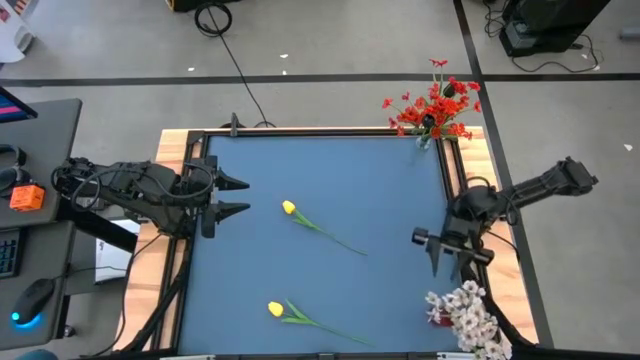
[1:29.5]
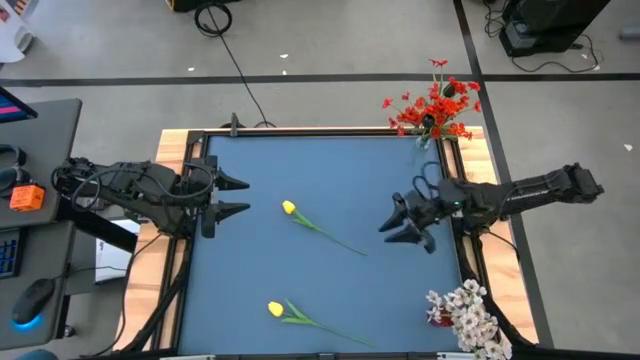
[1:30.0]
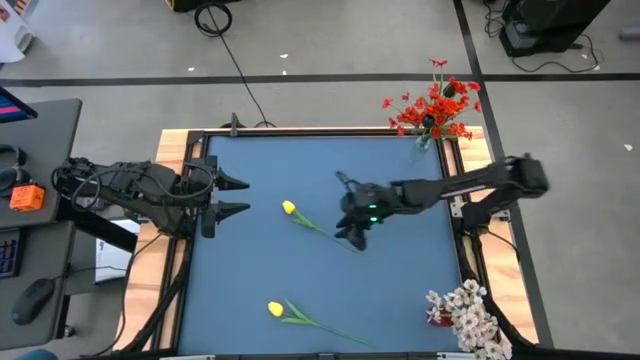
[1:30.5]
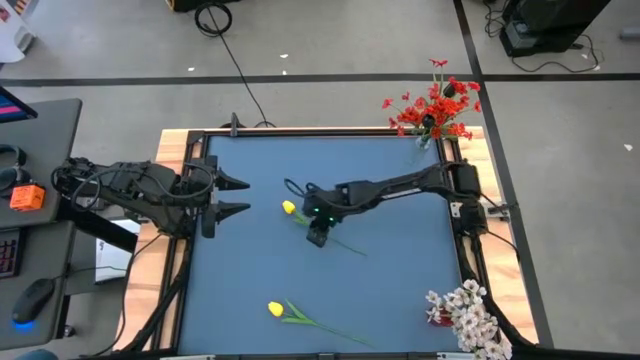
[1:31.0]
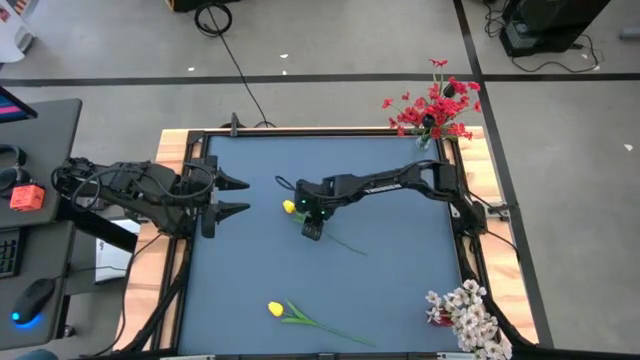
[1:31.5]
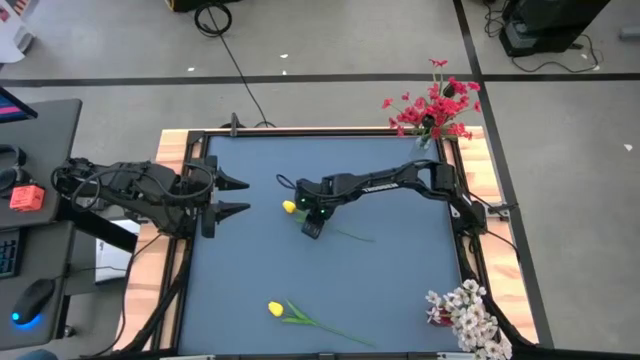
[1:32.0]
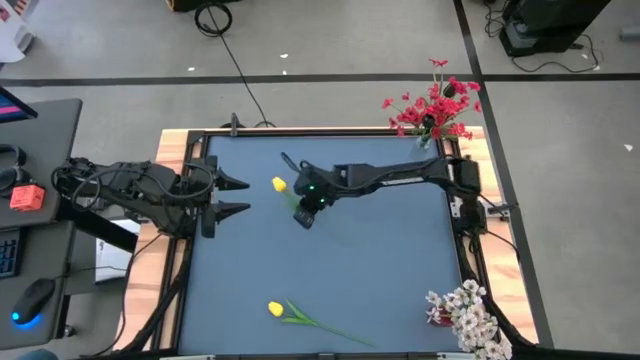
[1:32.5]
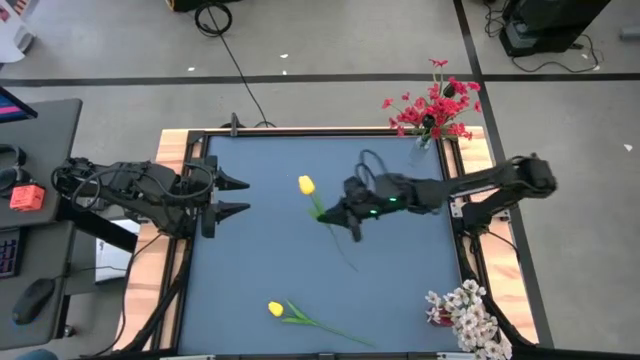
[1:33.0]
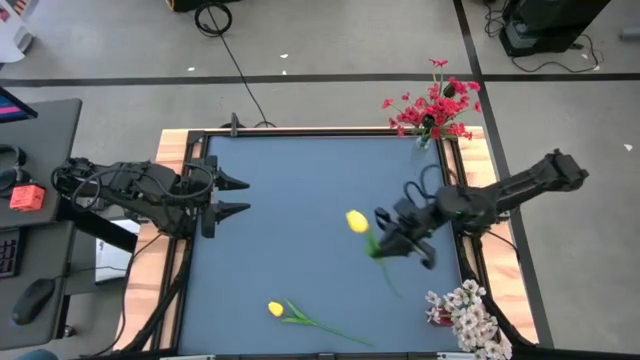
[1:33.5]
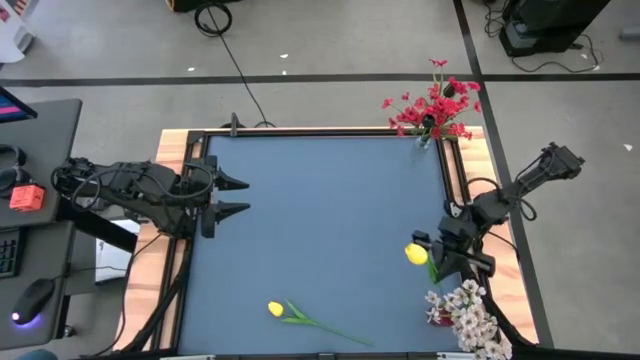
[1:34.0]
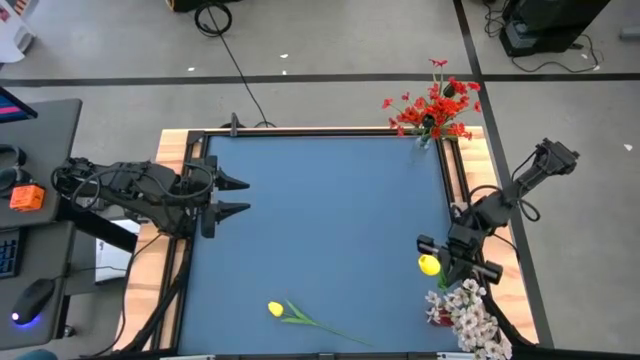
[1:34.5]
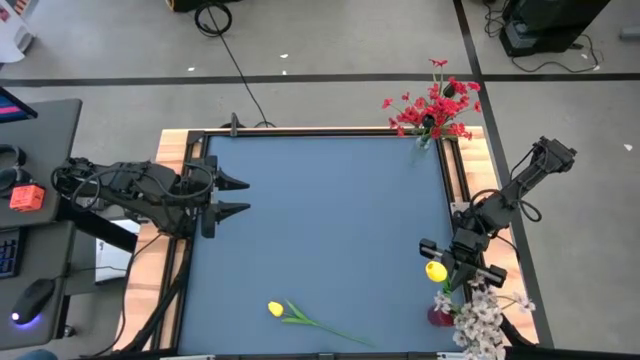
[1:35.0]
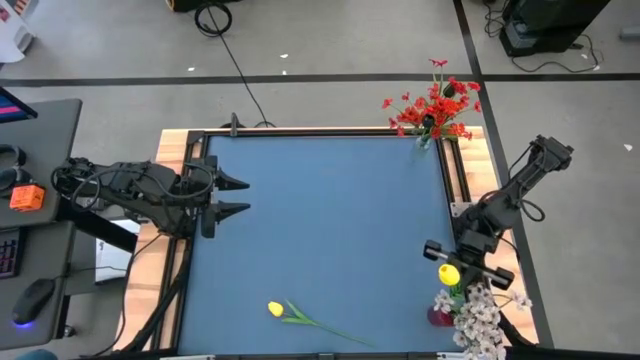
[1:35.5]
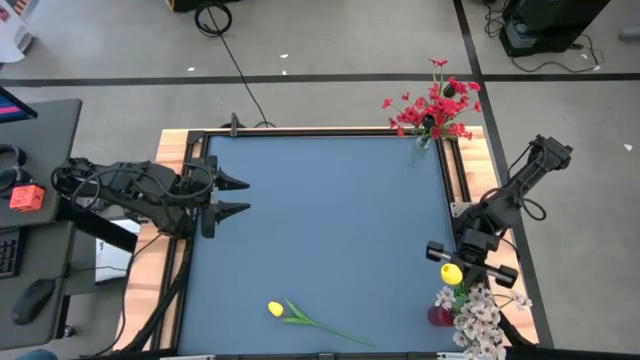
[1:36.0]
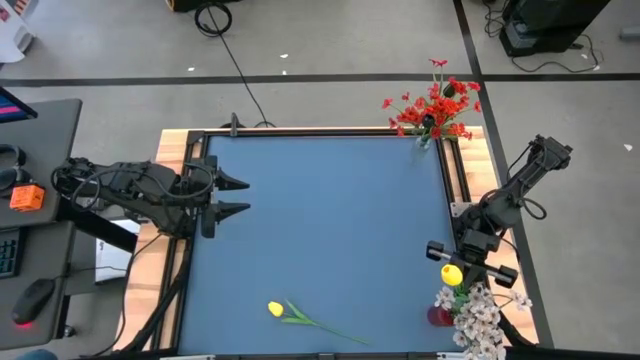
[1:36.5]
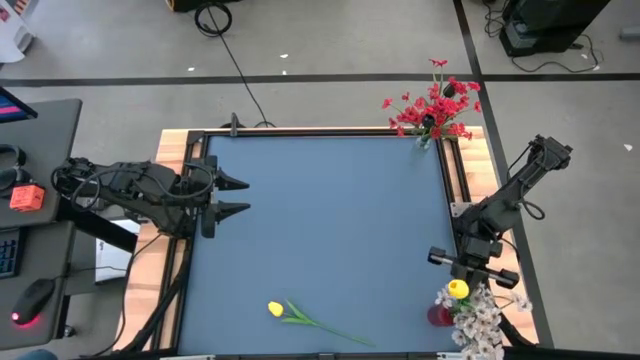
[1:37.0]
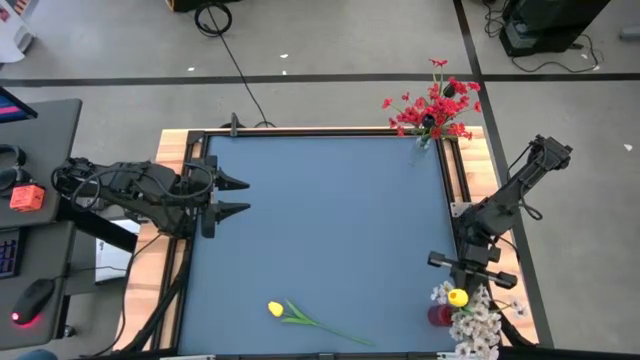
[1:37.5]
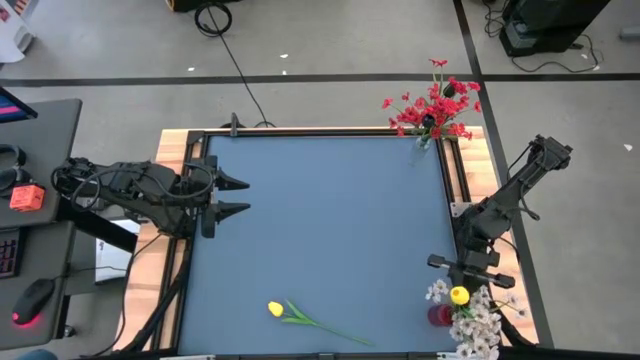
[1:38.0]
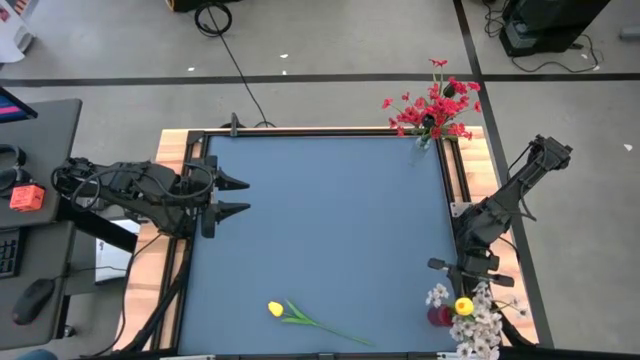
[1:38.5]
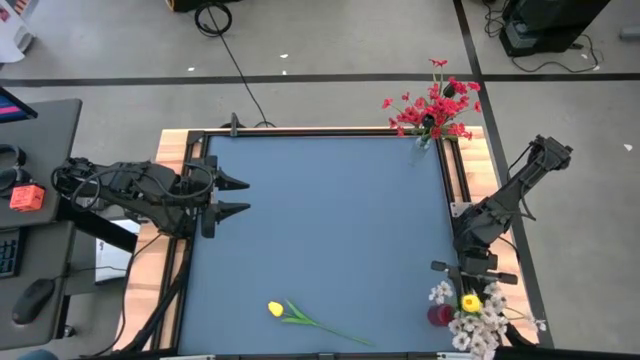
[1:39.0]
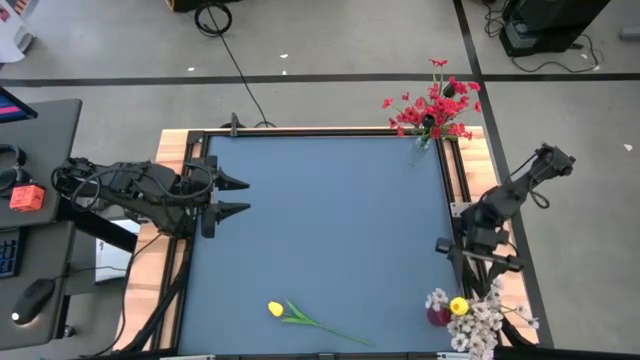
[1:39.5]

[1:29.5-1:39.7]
Task: Sort flowers into vase by color
Put the top yellow flower into the red vase

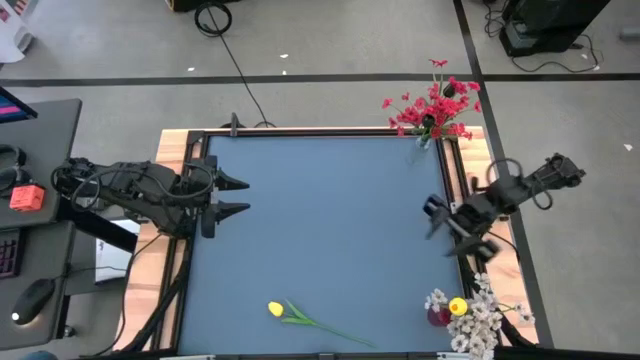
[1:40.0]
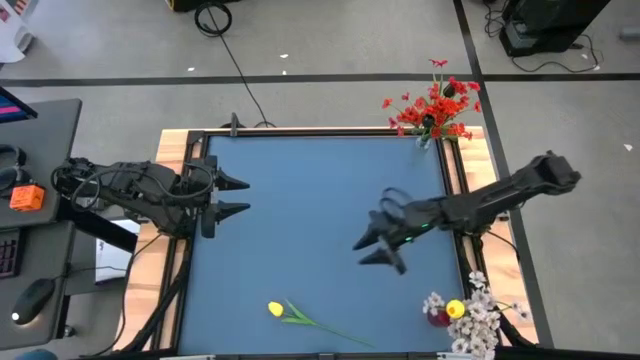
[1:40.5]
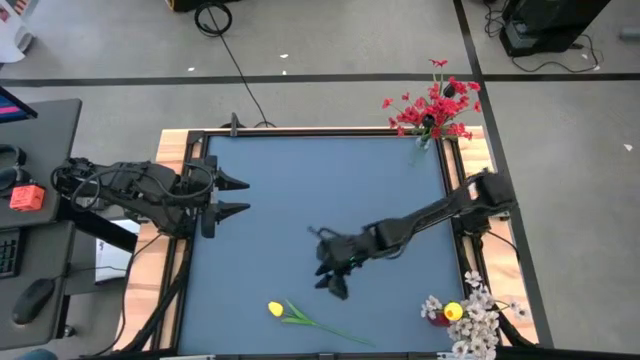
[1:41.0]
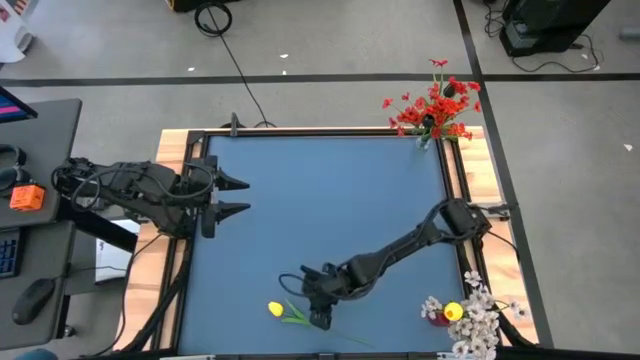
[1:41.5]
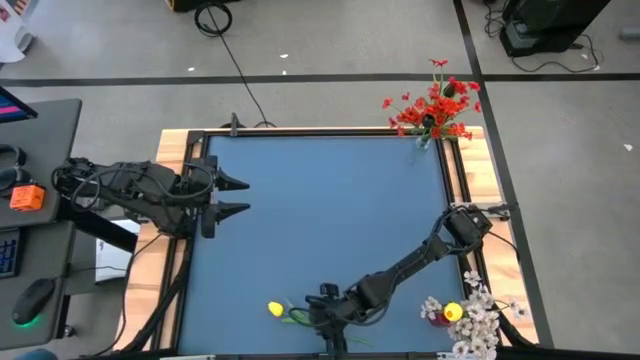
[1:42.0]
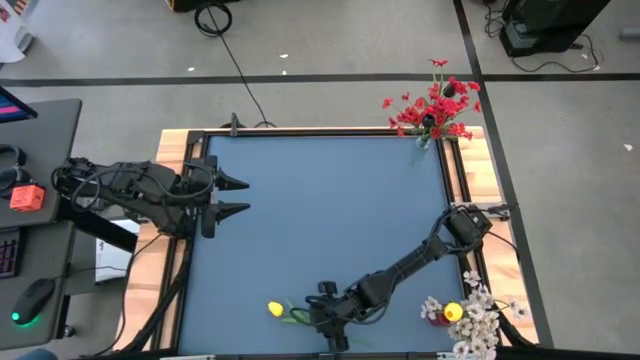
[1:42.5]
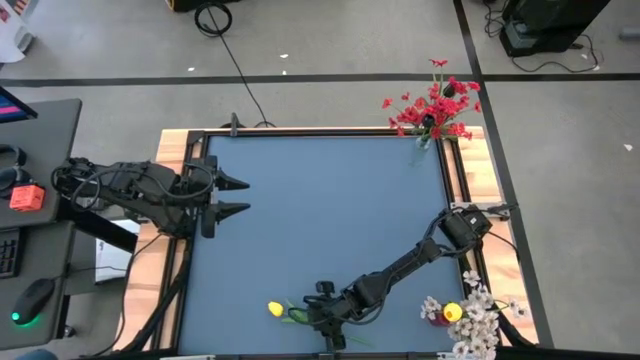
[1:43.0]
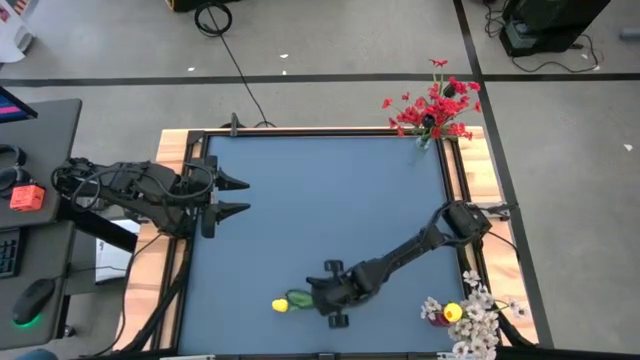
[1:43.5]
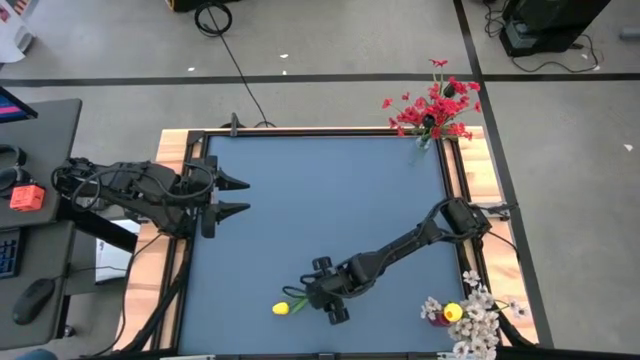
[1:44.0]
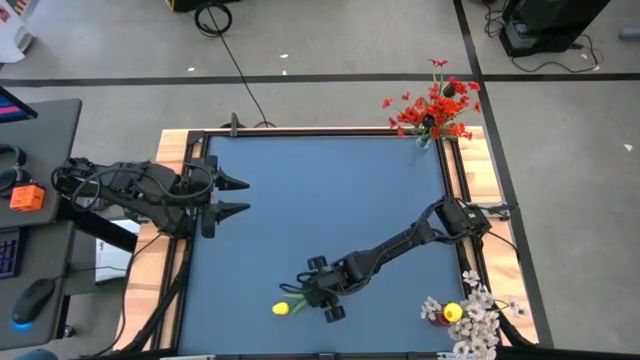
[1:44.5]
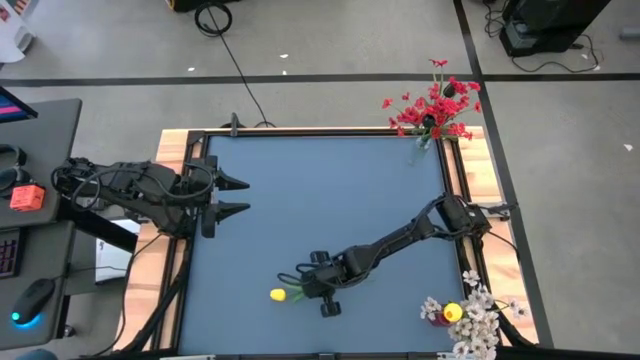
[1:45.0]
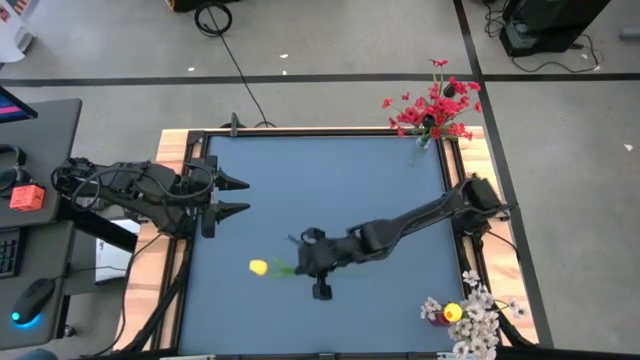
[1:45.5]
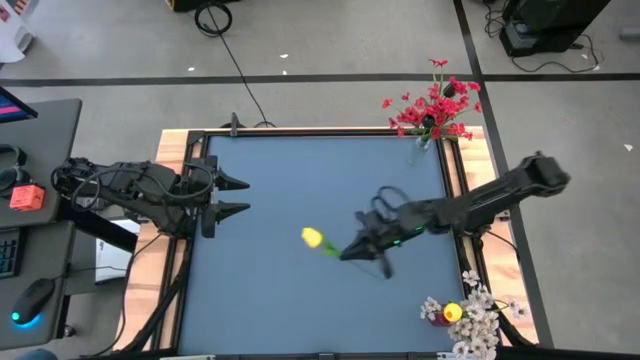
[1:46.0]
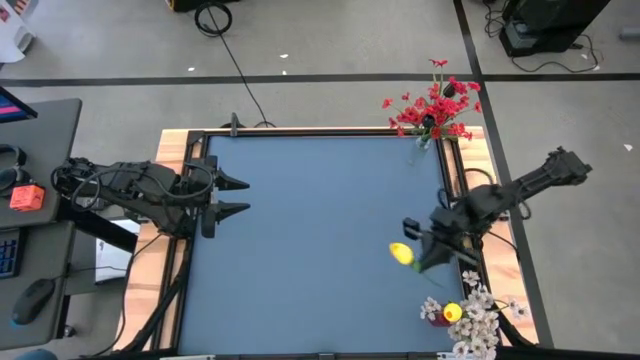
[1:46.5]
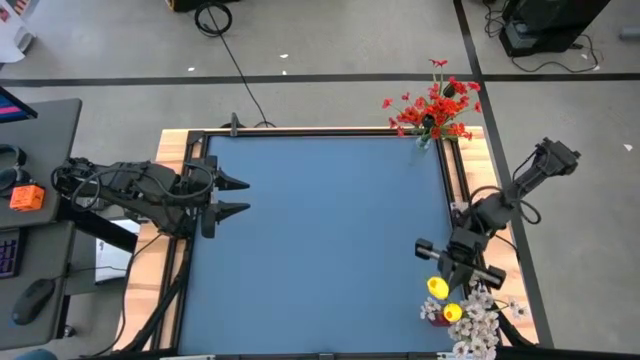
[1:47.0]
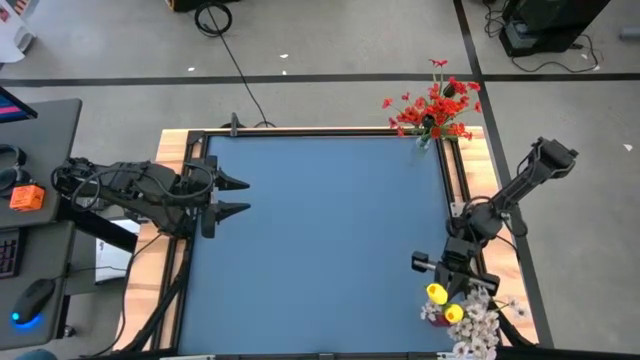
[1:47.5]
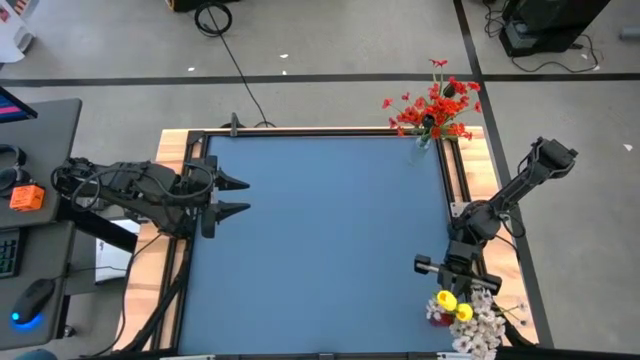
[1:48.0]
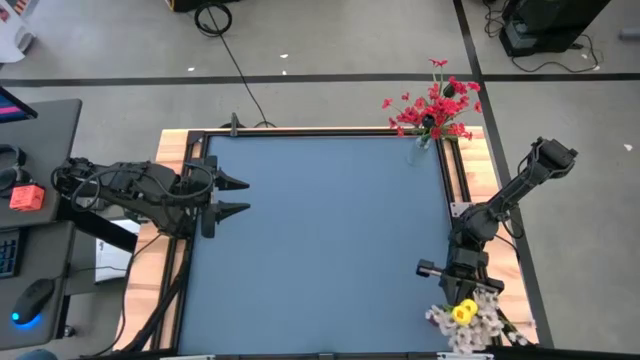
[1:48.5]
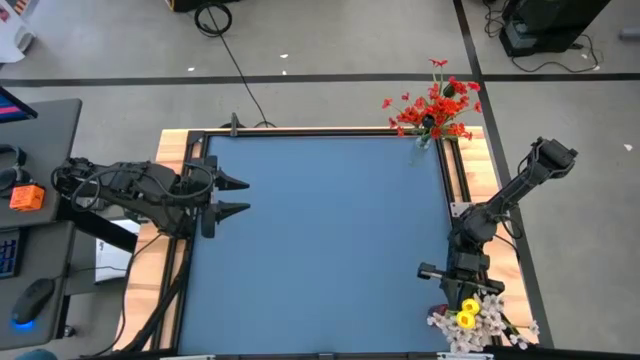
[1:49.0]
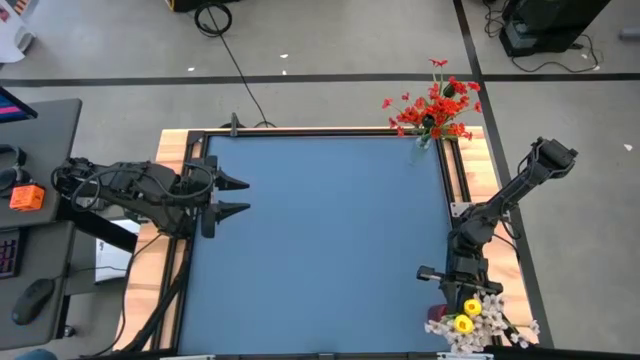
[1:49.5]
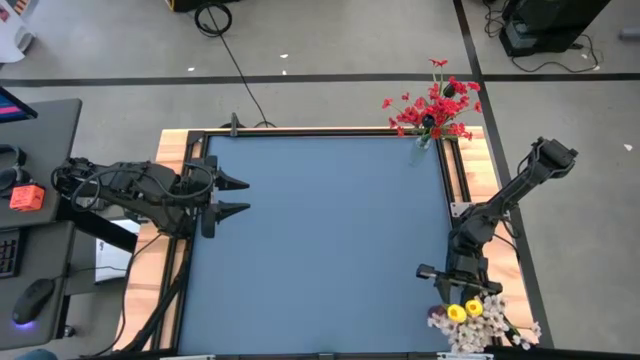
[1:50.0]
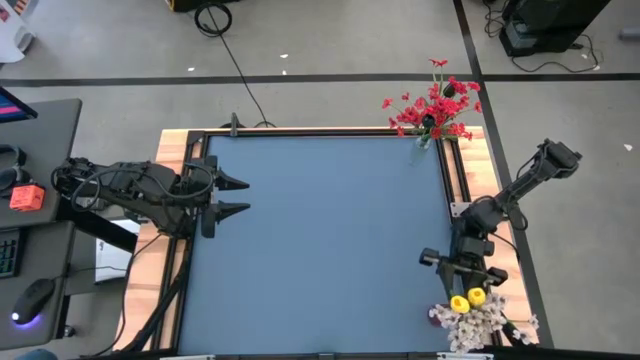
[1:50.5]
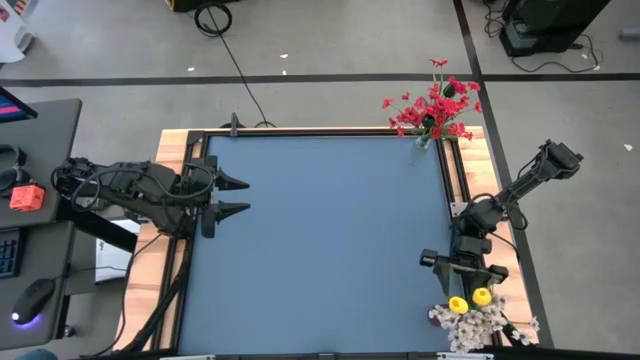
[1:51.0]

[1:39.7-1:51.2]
Put the yellow flower into the red flower vase
